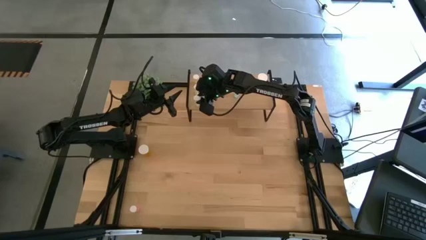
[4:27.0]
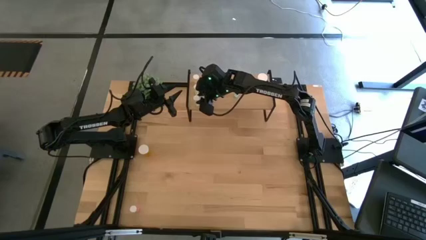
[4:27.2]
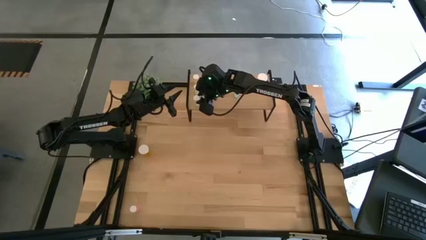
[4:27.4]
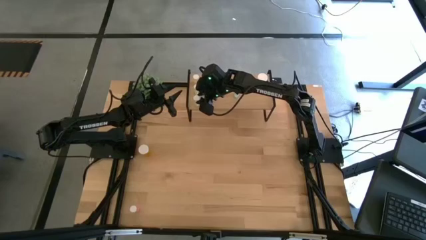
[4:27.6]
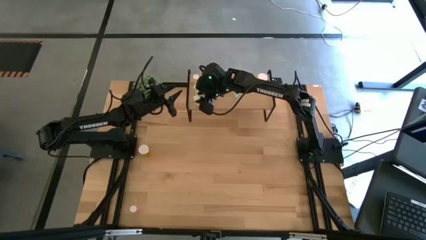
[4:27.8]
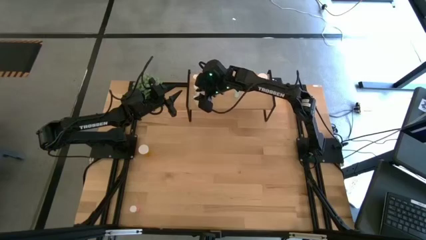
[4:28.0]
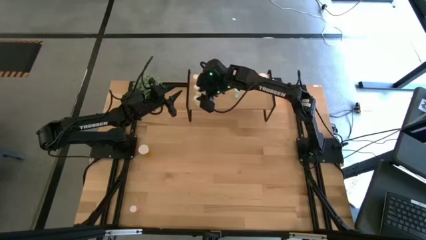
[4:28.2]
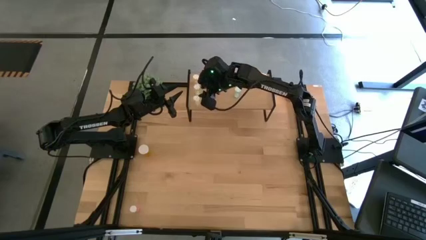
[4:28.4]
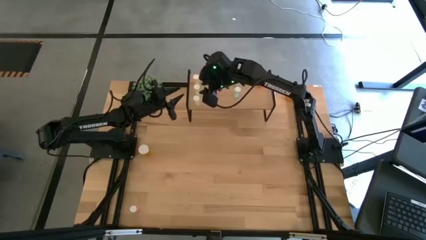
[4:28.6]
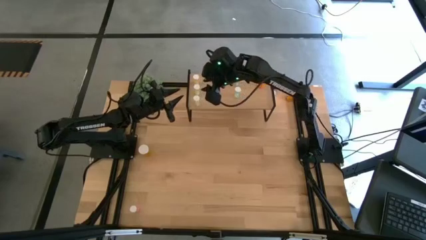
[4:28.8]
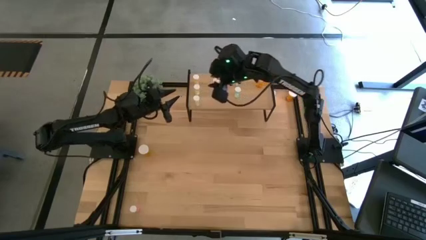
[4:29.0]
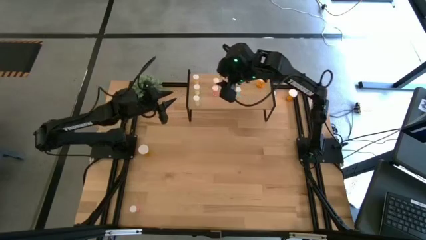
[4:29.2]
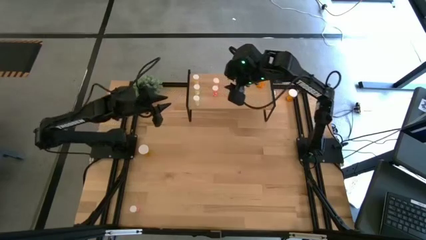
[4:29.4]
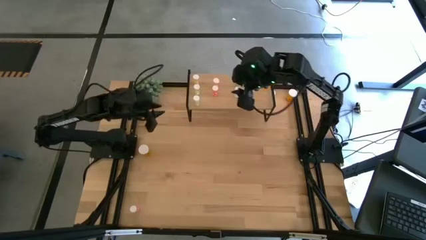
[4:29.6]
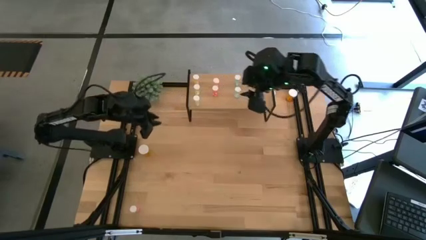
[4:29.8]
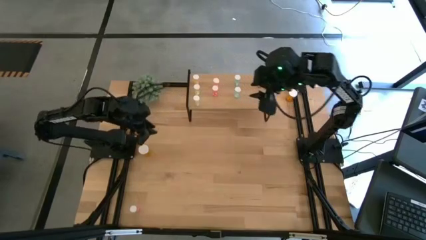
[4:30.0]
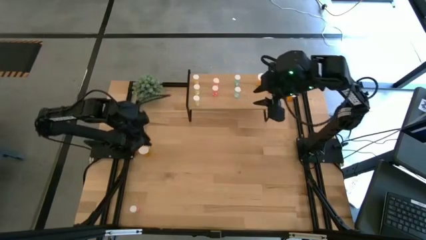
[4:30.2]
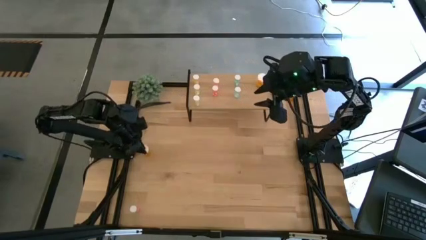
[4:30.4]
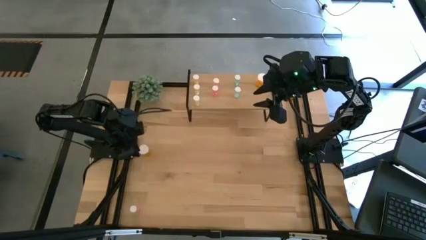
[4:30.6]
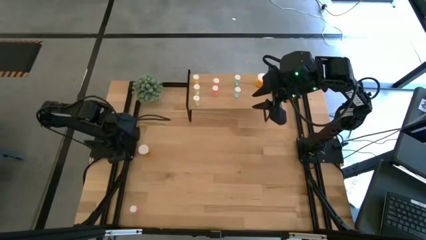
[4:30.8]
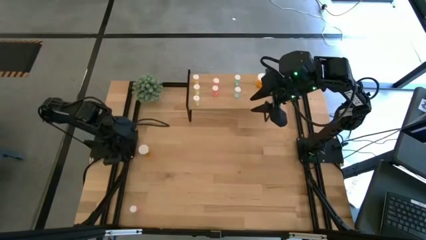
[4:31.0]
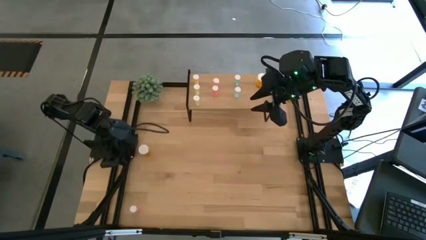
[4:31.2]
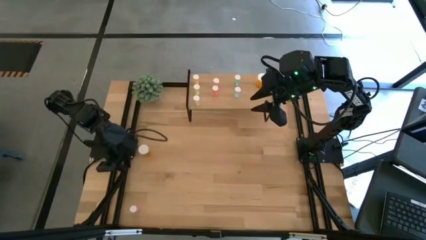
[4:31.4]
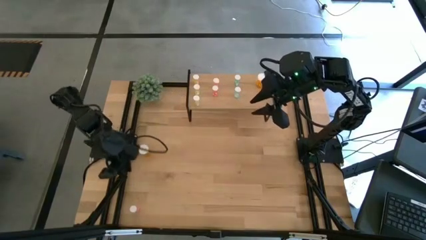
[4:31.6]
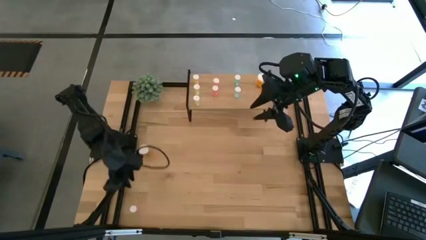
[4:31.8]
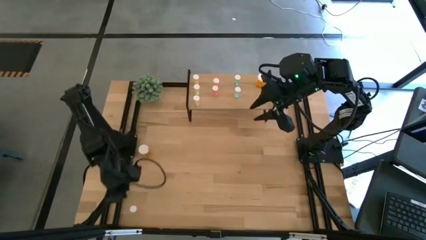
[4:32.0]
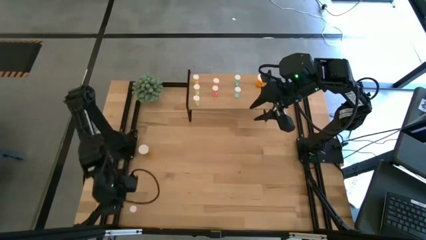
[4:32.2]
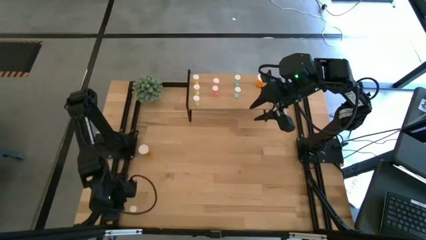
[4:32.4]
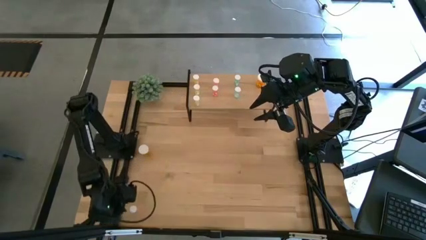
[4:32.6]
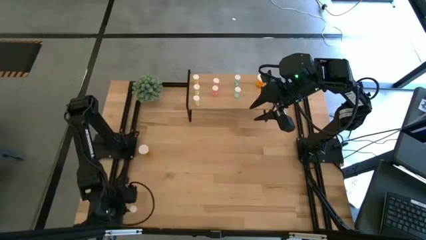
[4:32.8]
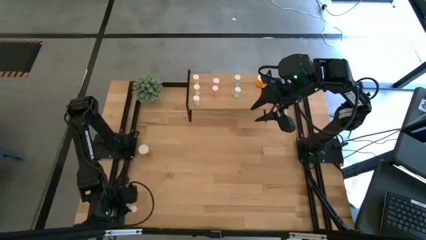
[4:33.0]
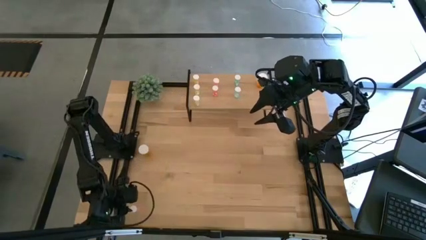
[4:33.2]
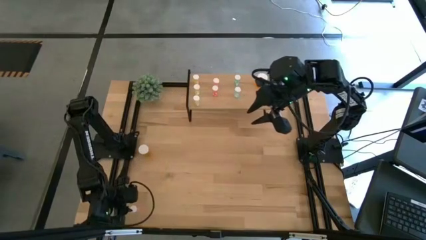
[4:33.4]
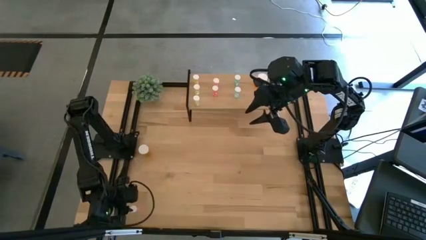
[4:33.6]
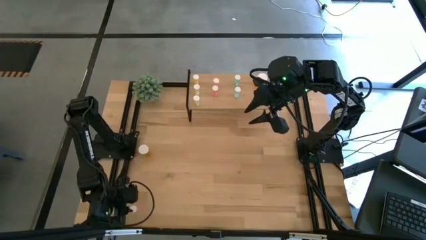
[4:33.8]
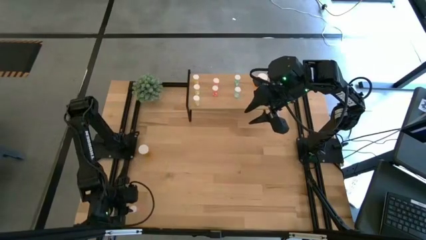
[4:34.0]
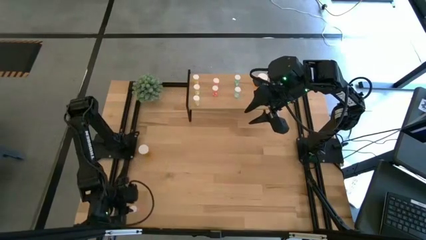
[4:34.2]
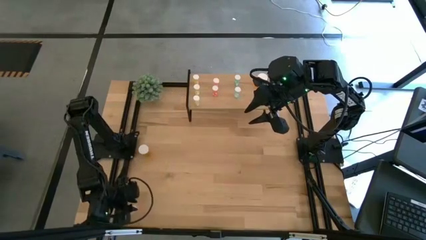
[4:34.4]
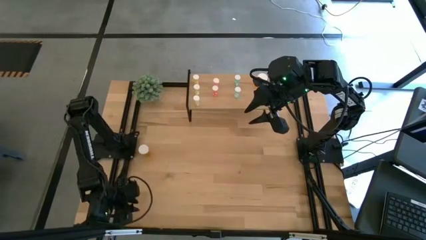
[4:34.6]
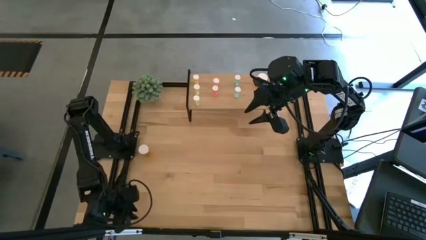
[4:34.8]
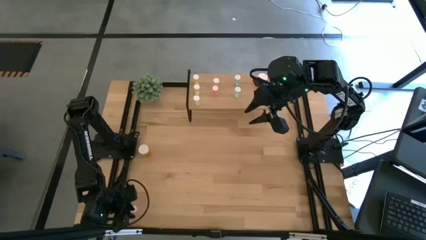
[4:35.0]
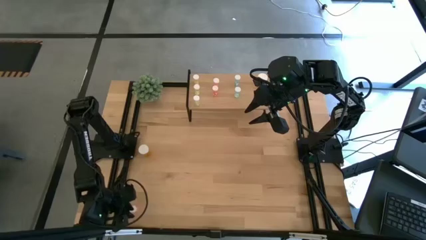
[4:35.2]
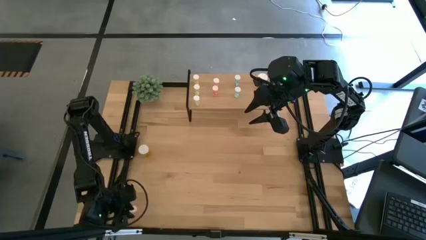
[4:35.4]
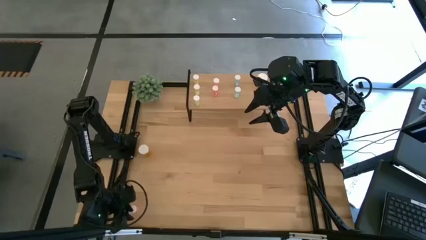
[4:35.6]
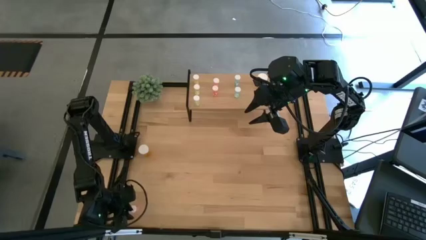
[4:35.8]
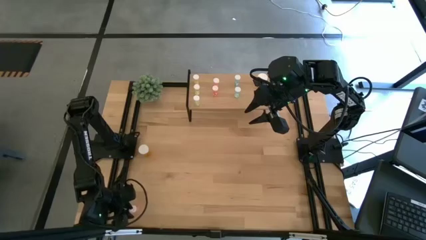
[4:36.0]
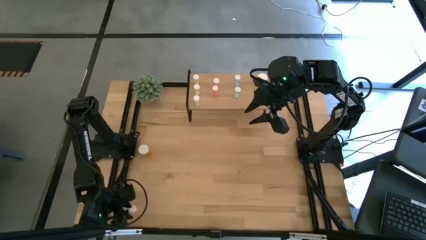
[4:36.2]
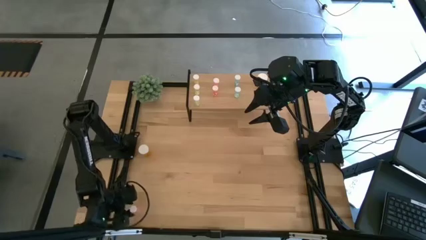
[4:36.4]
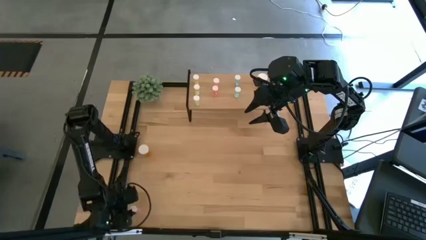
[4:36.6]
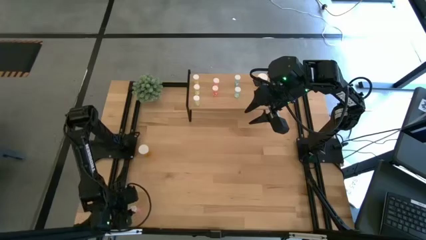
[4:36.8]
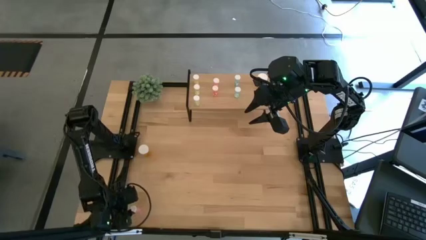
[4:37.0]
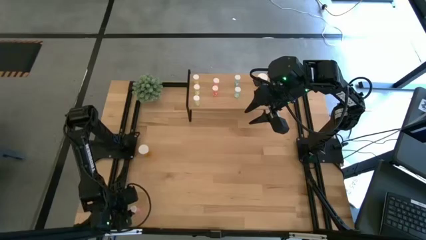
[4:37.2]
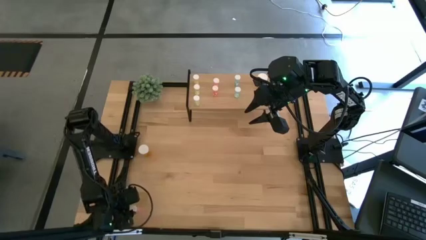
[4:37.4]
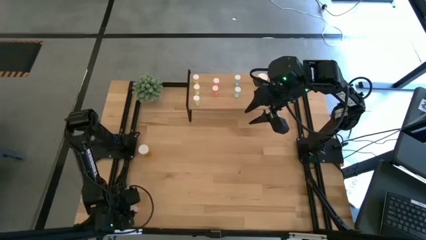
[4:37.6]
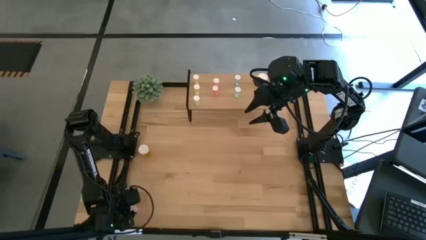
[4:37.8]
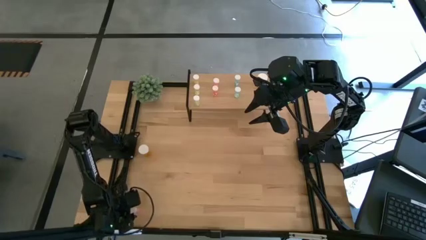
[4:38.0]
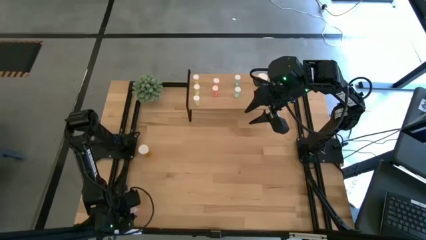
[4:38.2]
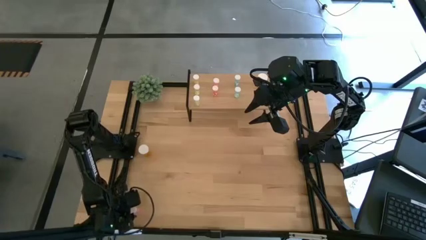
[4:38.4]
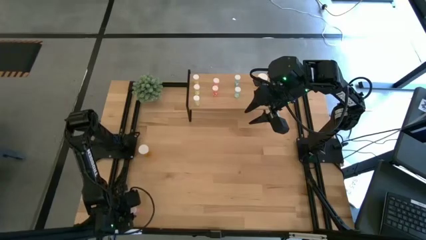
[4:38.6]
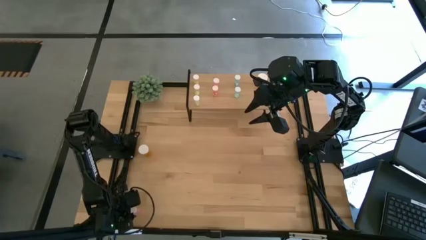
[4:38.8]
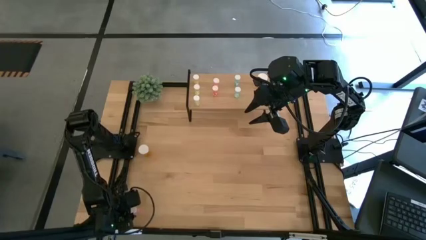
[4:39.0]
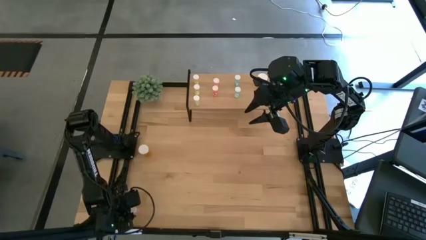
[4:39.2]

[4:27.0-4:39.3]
Task: Pick and place medicine bottles onto shelf by color
Put the pink pill bottle on the shelf aligned with the other pink pill bottles

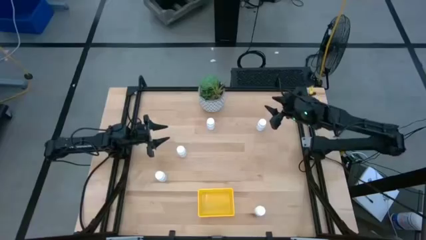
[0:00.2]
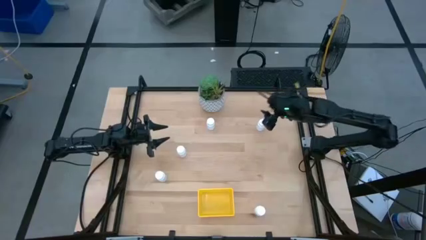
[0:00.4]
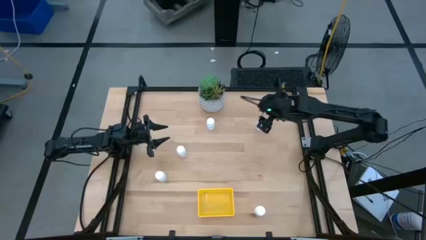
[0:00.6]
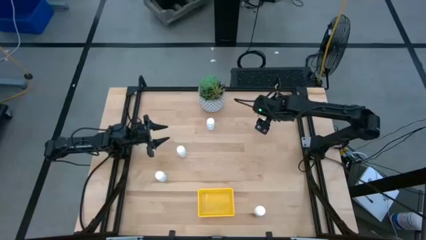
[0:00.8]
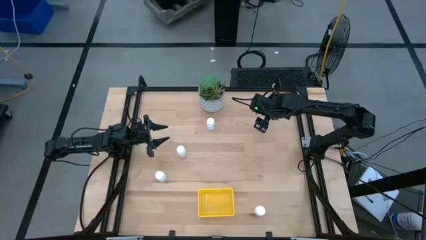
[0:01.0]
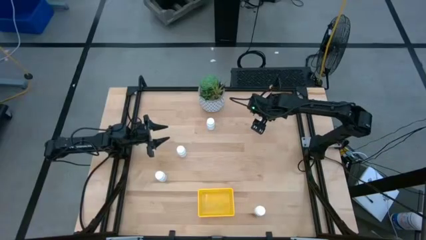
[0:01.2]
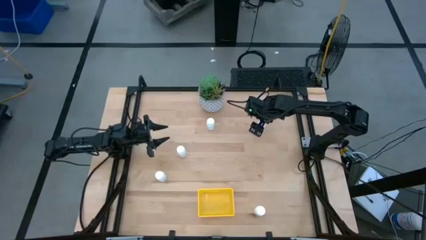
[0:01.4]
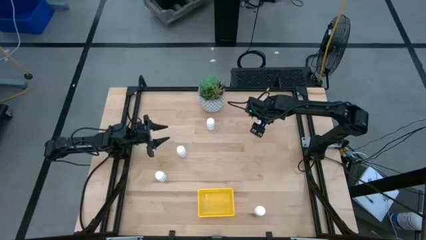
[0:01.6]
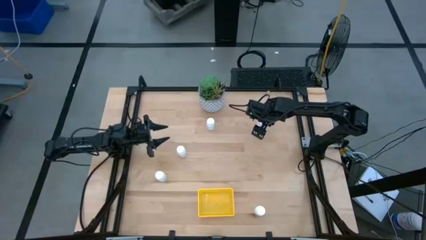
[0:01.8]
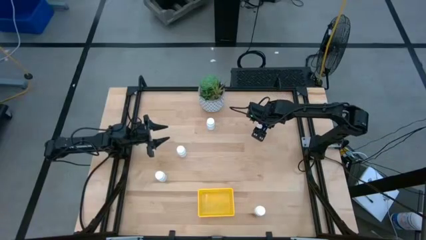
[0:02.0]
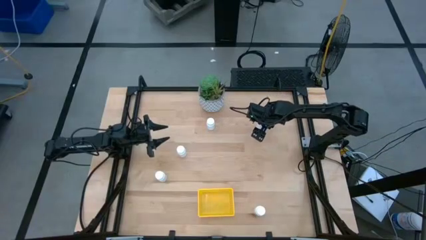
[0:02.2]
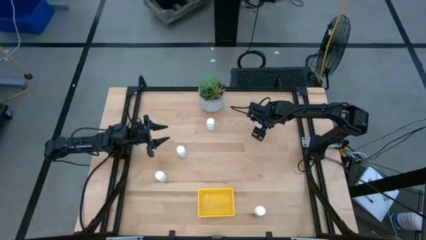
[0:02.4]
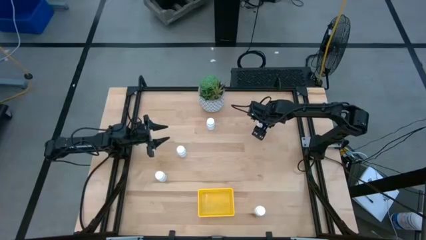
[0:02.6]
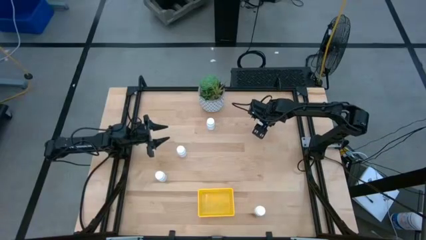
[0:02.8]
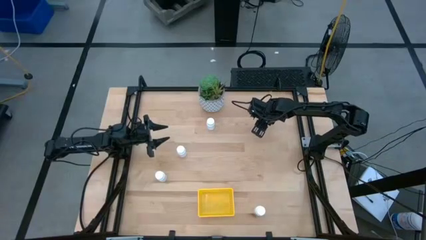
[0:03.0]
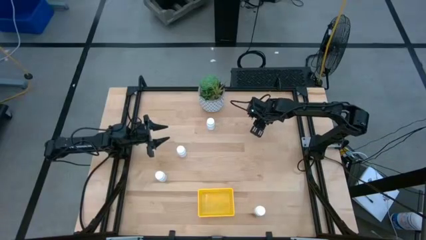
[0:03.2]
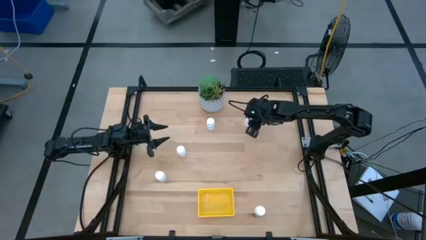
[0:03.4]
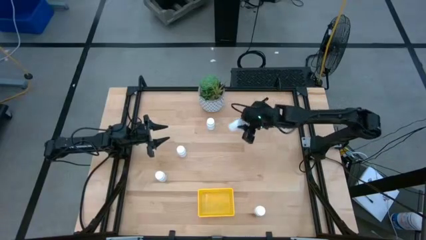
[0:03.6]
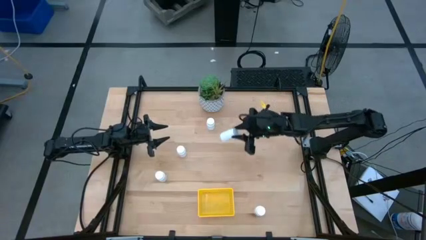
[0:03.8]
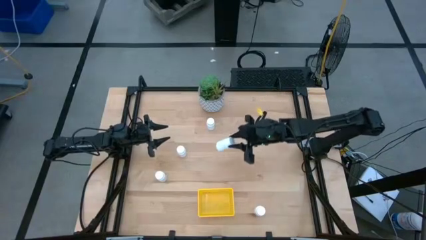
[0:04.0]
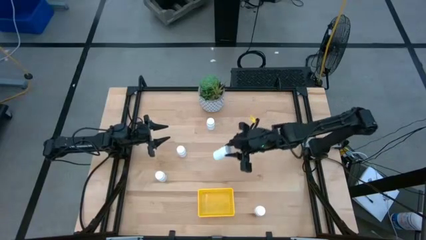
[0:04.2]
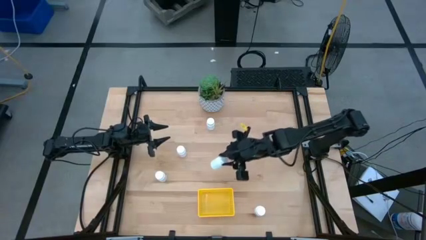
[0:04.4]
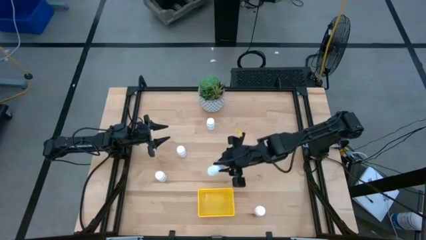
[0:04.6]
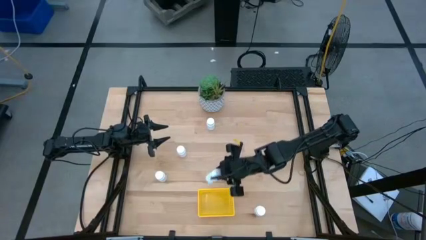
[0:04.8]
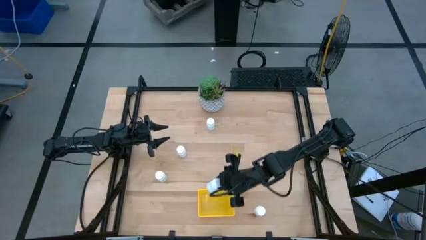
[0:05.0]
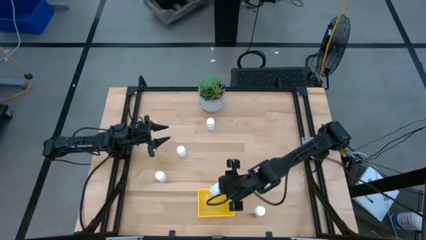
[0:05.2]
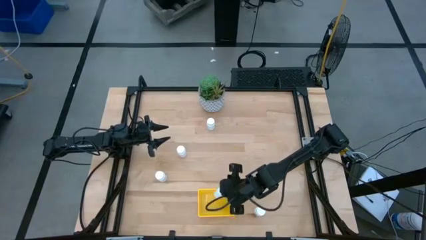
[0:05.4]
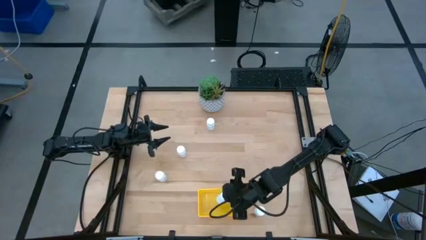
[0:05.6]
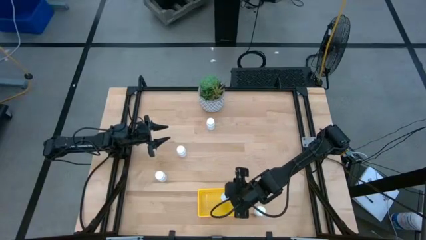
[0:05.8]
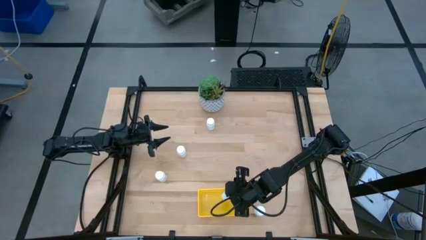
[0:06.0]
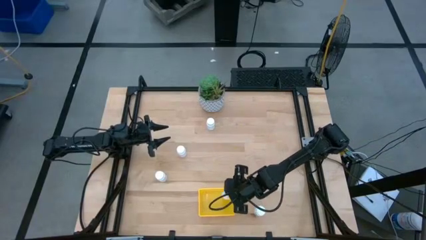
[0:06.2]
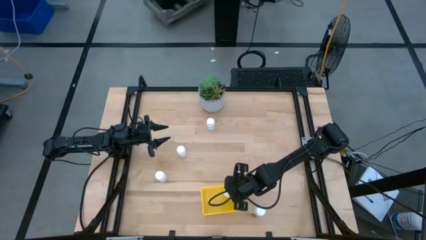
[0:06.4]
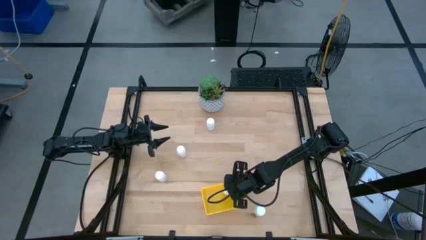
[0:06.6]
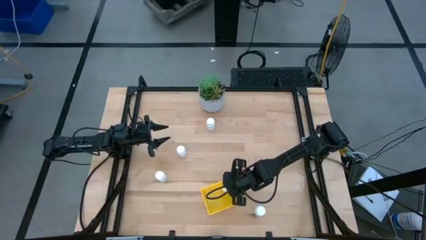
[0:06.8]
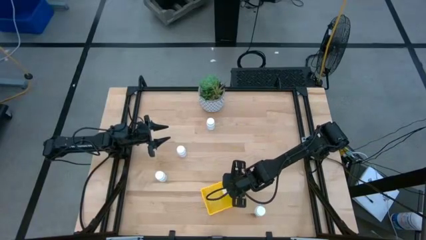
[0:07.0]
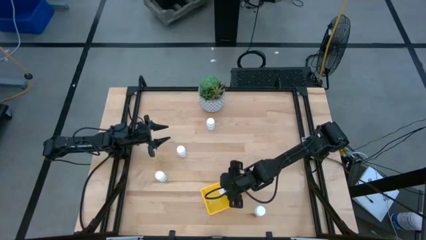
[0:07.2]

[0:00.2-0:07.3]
Task: Pick and place pill bottles into a basket
Put the white pill bottle into the yellow basket
